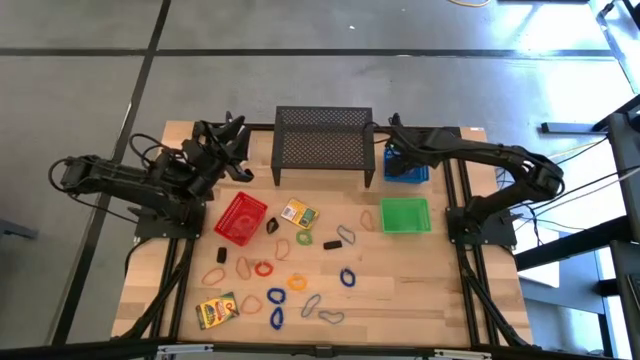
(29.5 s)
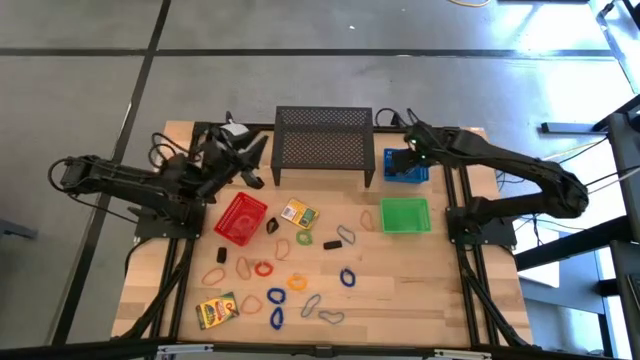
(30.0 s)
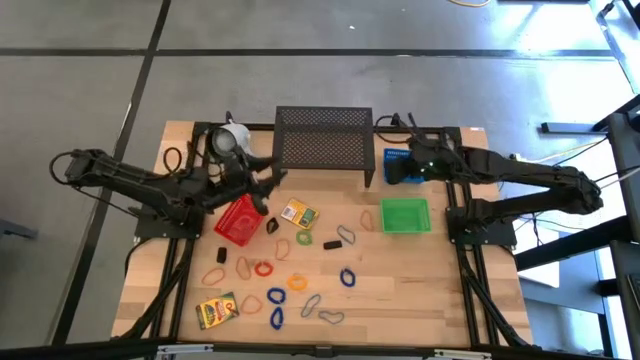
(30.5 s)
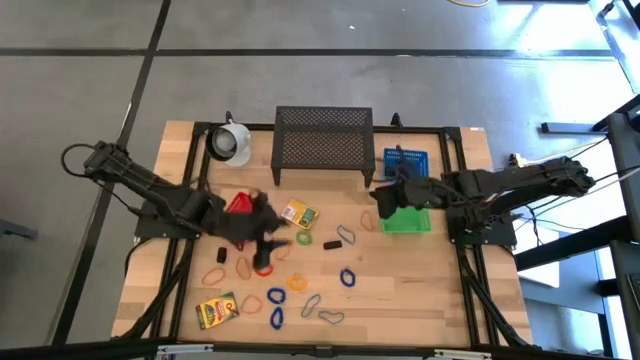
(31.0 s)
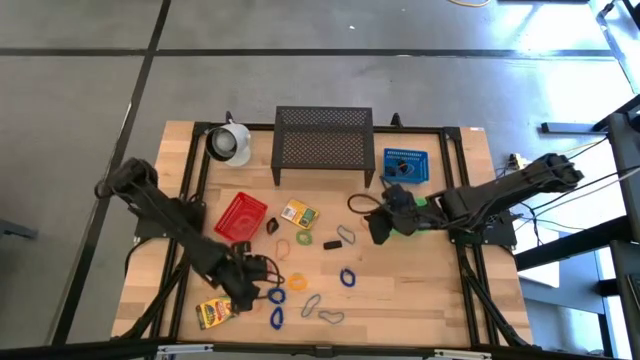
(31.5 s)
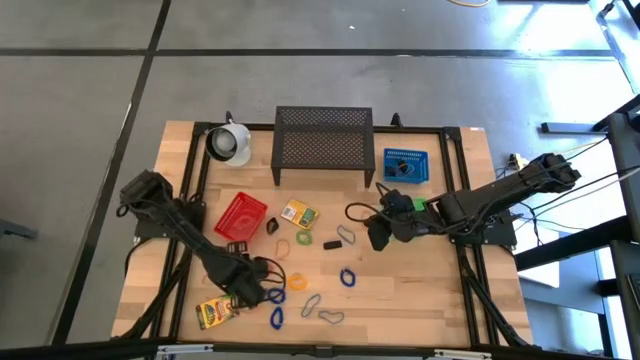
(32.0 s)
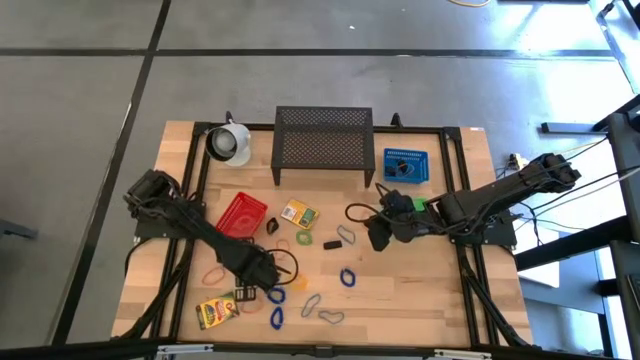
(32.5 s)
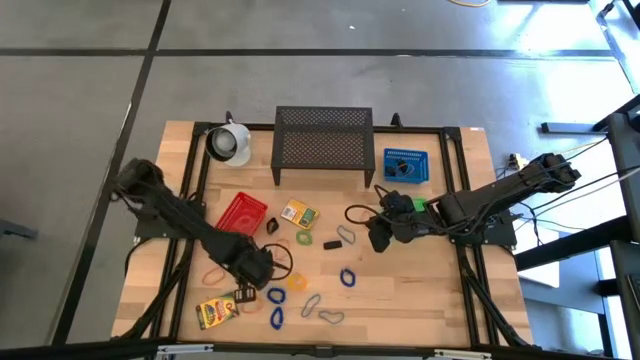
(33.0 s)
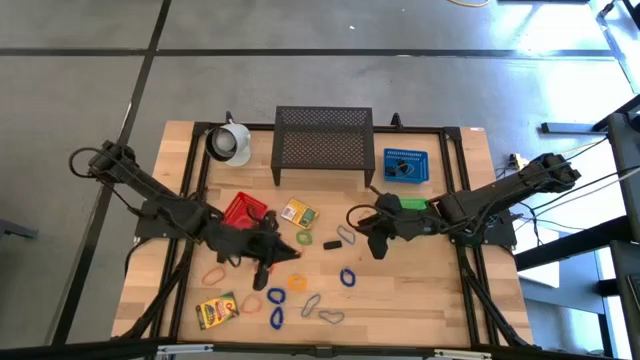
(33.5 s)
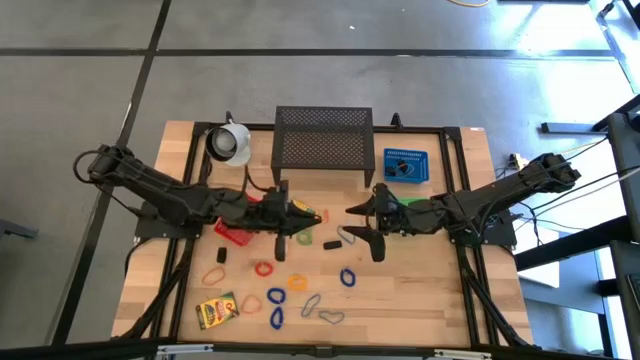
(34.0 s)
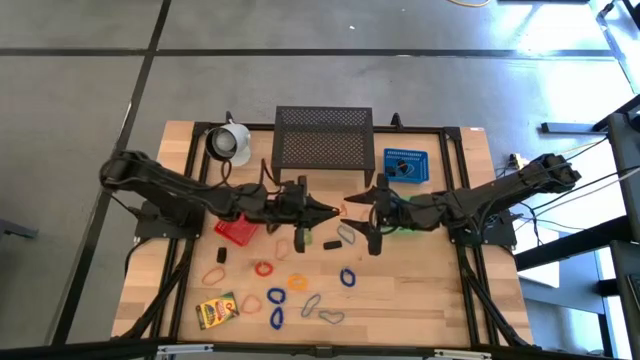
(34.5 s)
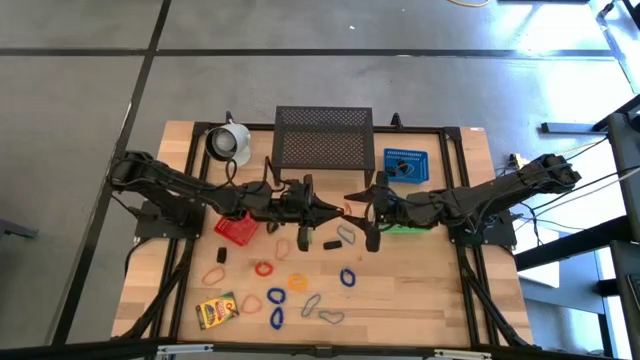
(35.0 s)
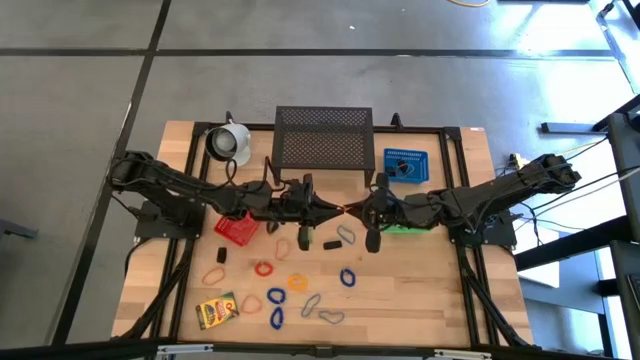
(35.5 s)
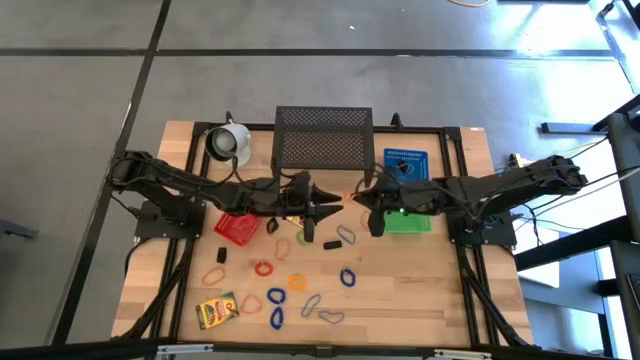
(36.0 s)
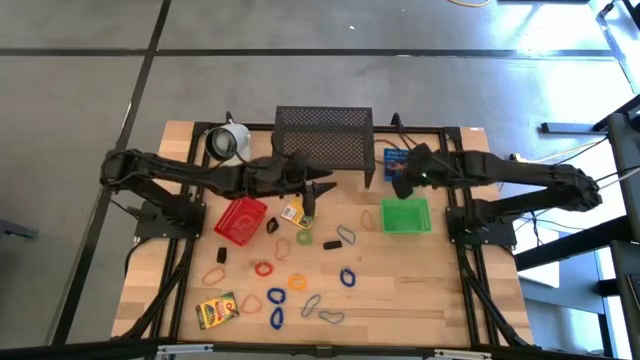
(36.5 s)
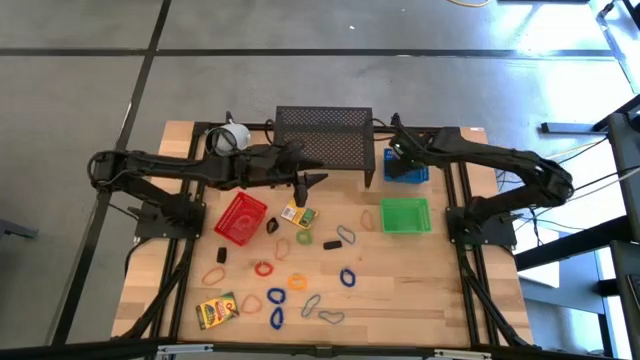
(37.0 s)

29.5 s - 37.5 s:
Task: Pick & Place Office Desk Supplies
Put the orange rubber band into the blue bin

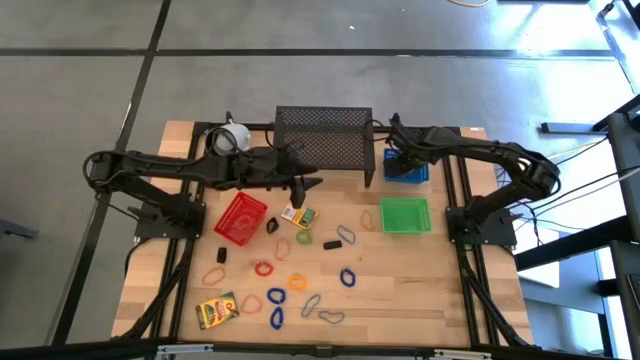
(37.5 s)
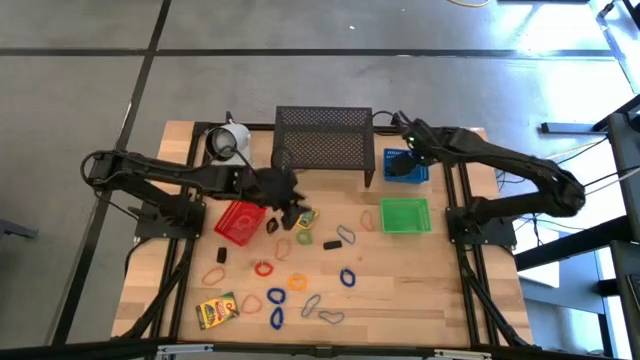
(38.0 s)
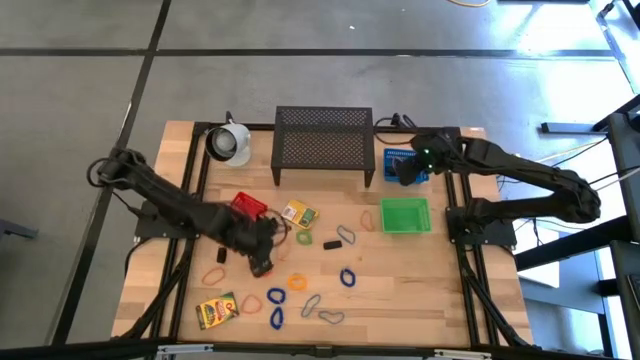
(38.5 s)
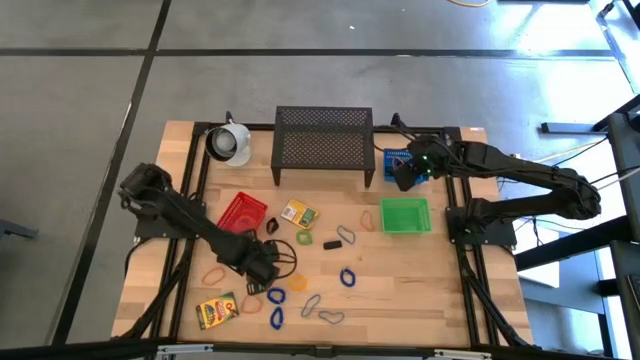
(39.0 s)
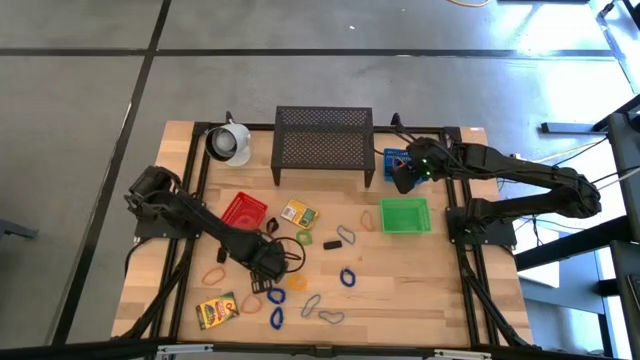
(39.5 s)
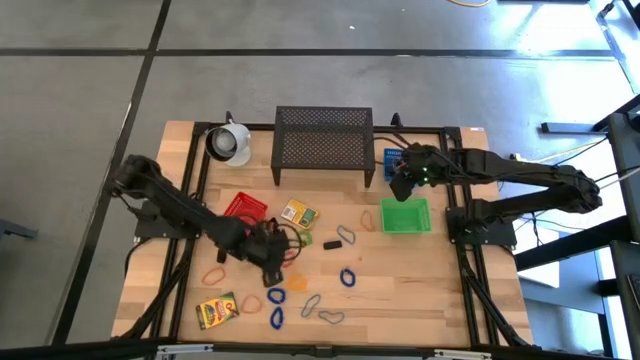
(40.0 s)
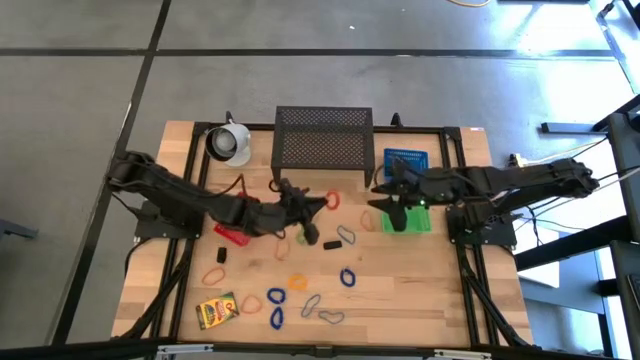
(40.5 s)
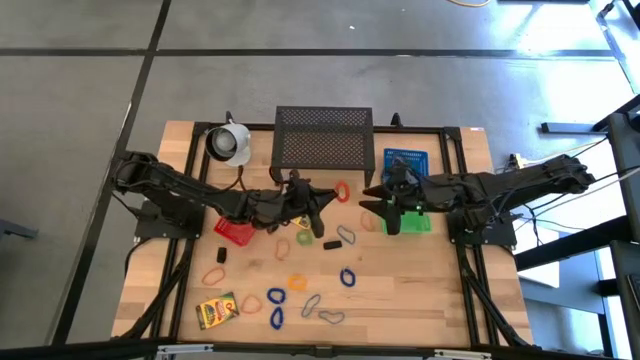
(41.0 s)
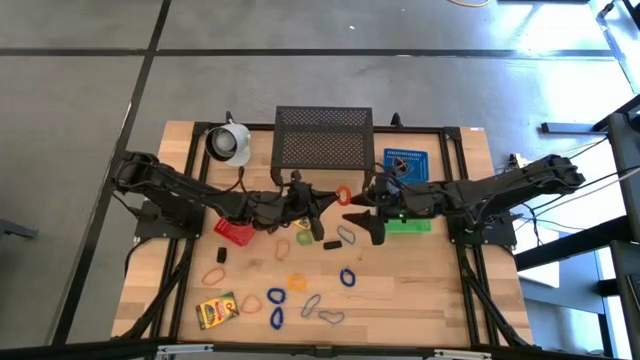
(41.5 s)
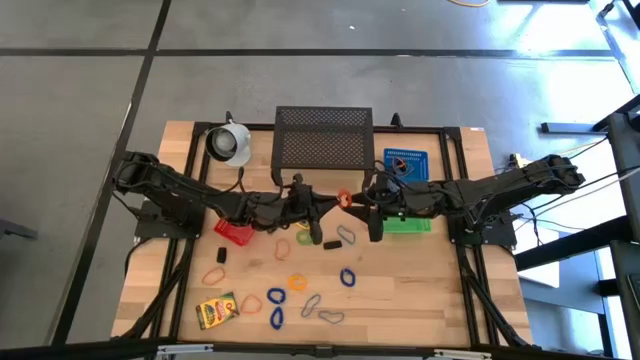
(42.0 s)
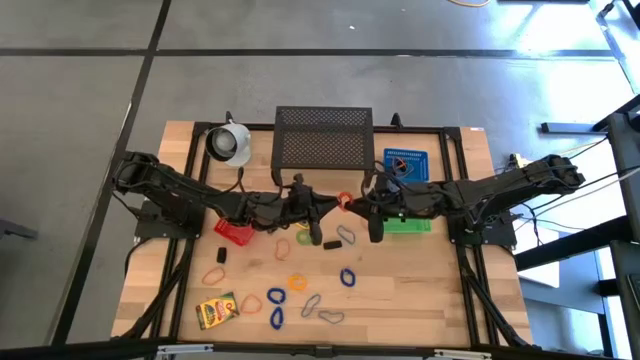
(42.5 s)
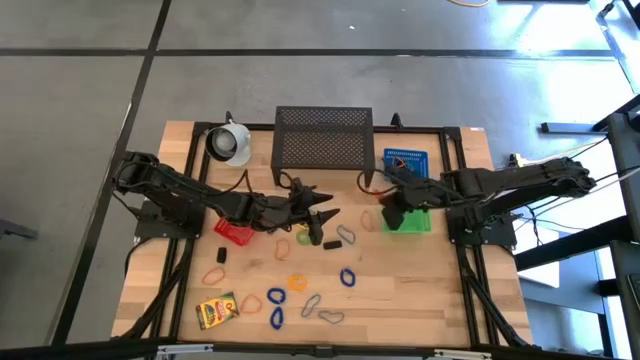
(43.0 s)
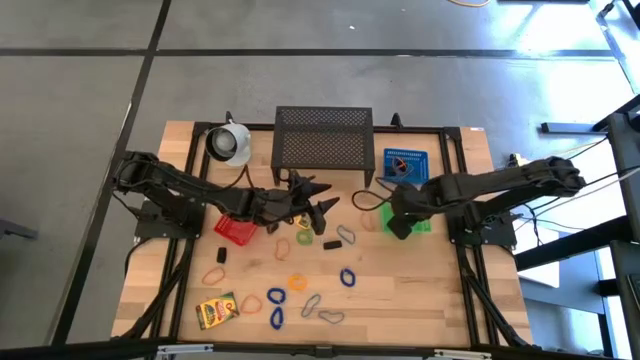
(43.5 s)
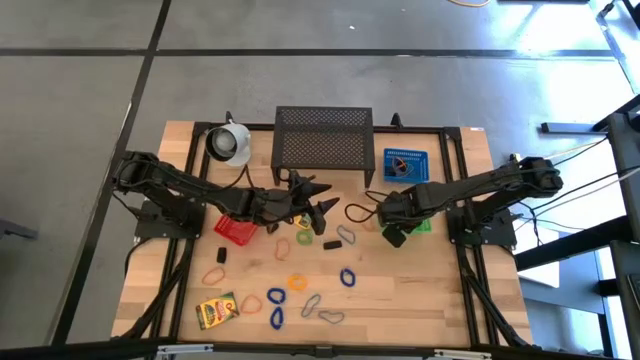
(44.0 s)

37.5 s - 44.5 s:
Put the orange spring keychain into the green bin

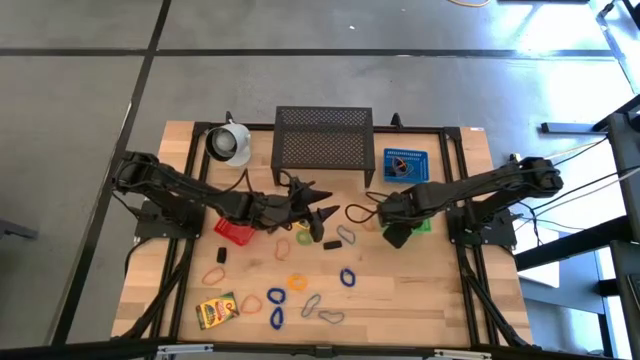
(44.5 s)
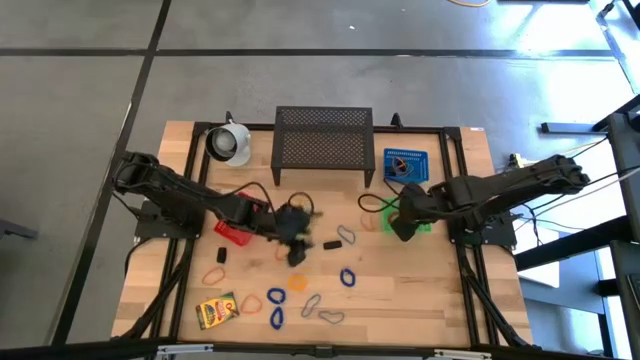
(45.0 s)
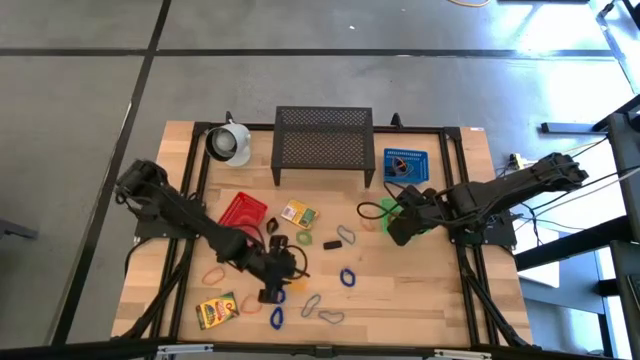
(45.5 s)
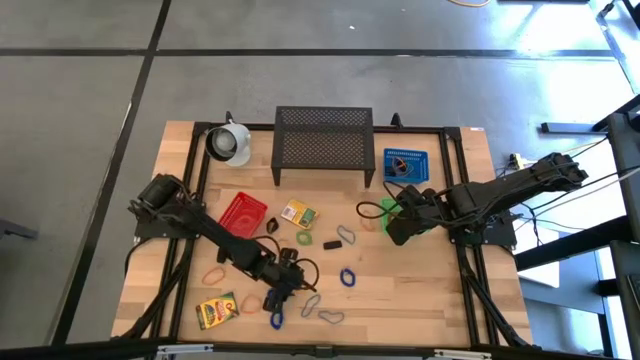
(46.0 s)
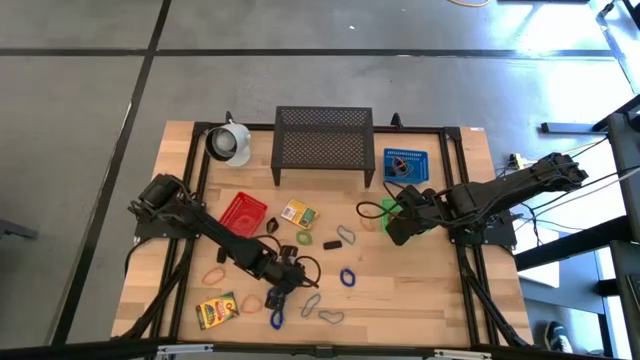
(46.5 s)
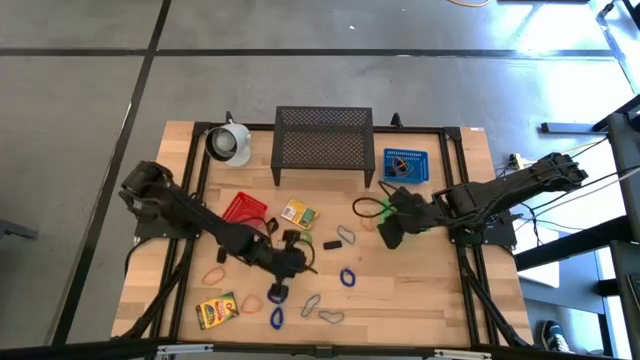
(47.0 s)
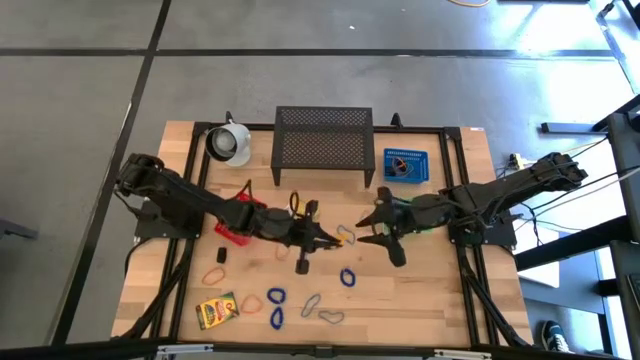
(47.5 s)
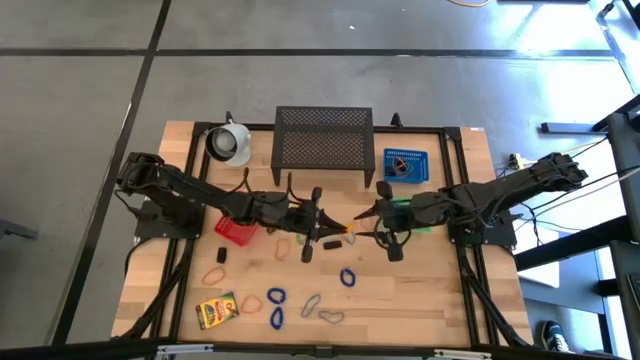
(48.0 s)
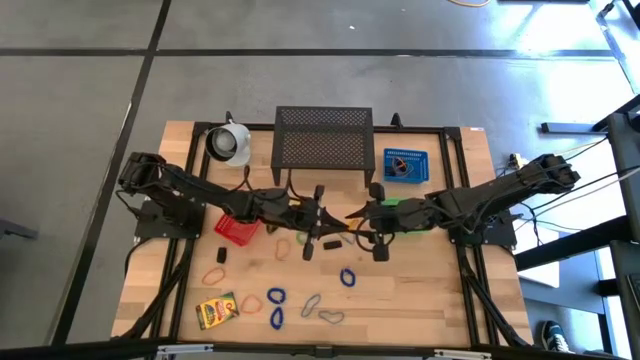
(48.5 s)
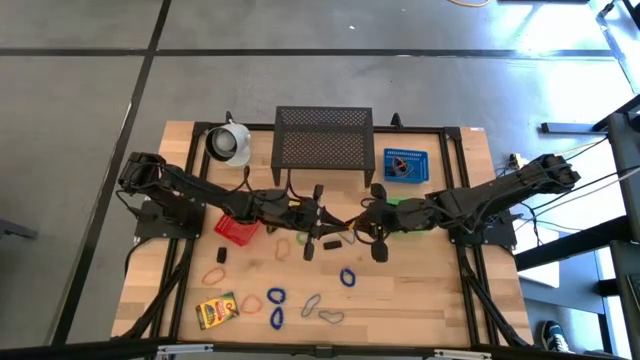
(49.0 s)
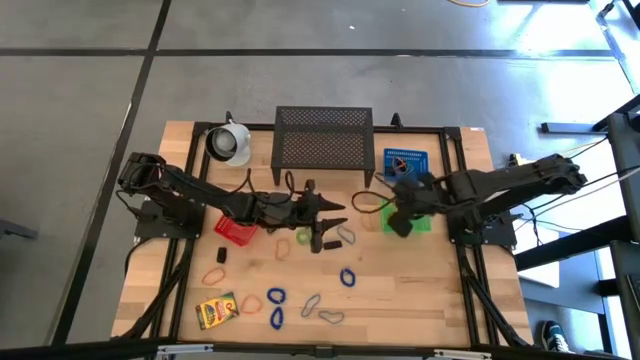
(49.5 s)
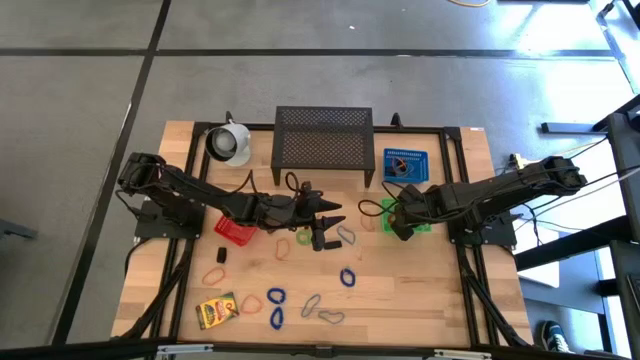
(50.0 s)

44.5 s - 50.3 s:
Put the yellow spring keychain into the green bin
